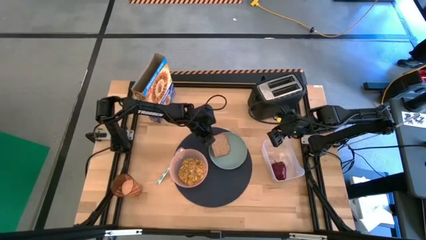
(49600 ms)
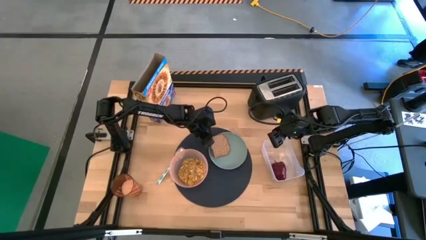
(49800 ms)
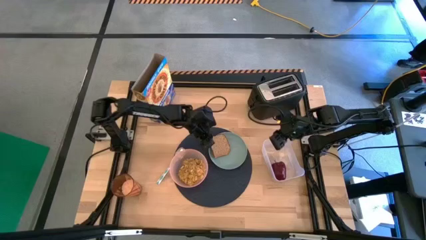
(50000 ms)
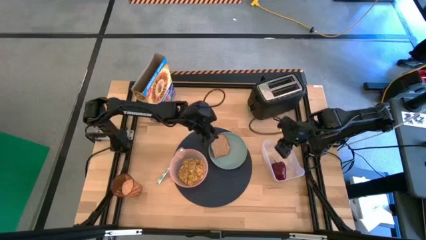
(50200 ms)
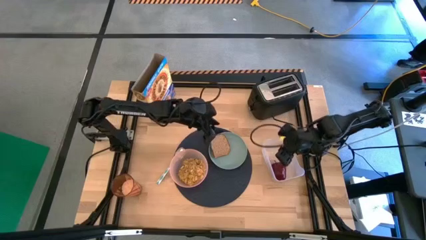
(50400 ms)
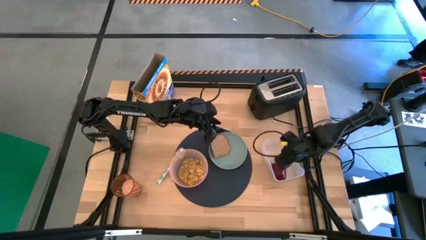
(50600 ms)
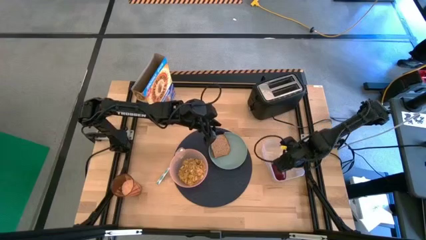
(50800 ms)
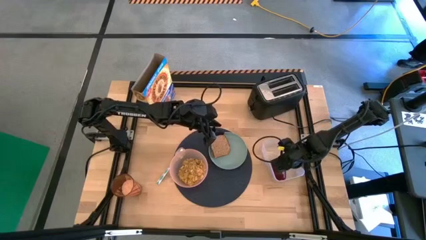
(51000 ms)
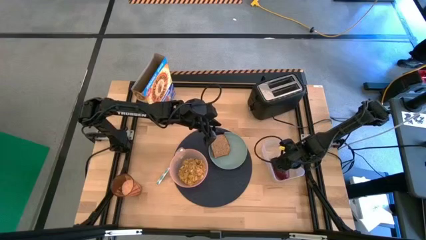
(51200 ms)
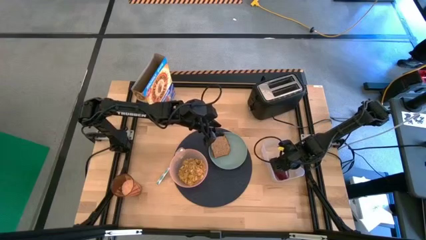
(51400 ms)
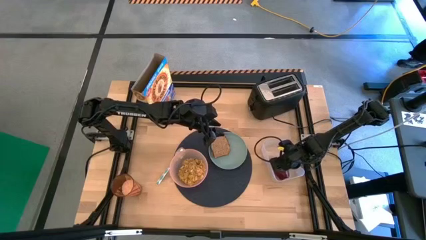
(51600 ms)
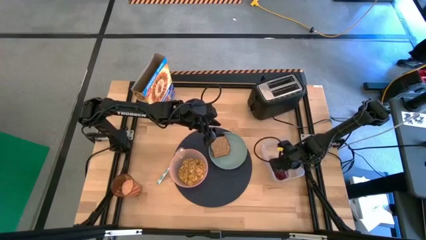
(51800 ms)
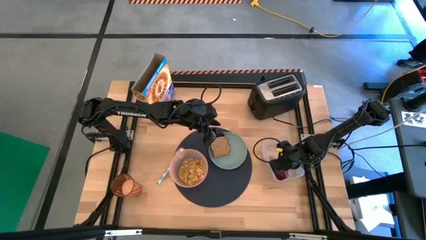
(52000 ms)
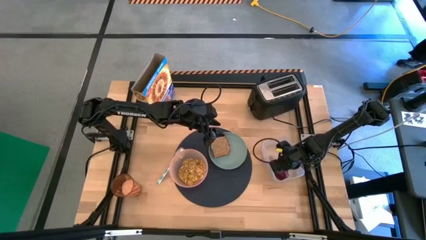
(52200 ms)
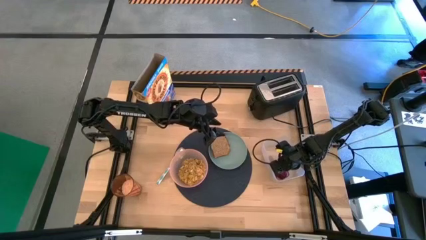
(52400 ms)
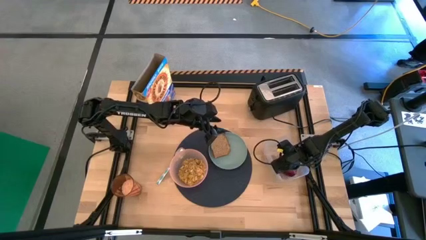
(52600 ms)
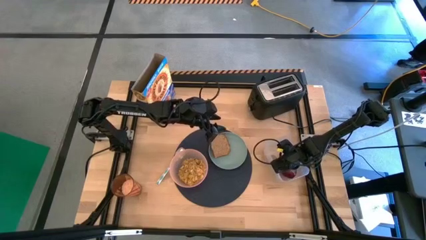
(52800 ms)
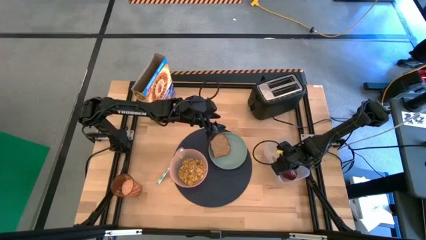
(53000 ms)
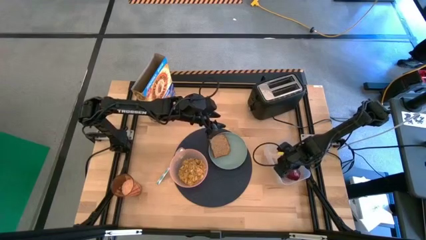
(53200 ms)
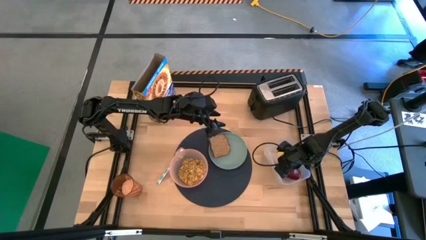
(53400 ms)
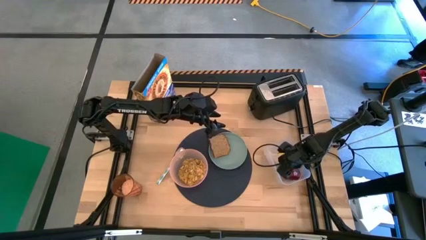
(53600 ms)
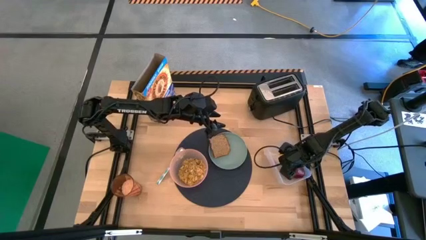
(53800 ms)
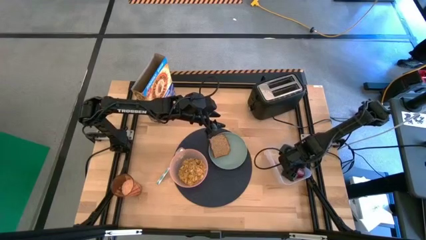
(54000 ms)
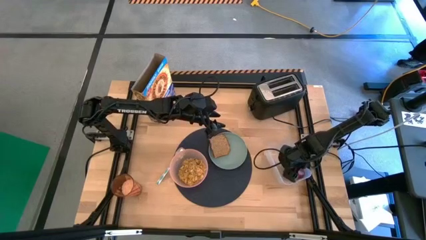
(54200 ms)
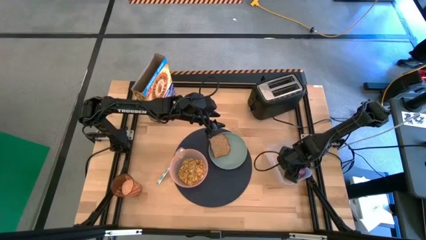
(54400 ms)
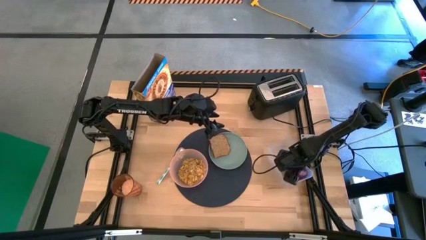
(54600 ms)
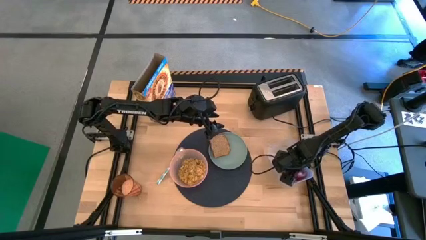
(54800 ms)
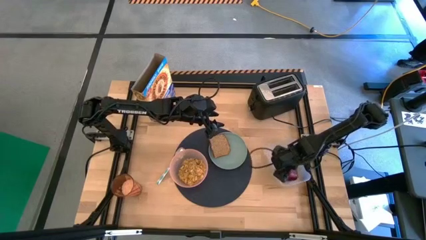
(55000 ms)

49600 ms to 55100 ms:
Task: Arrange a breakfast setting
Put the apple from the transparent bin on the blue plate

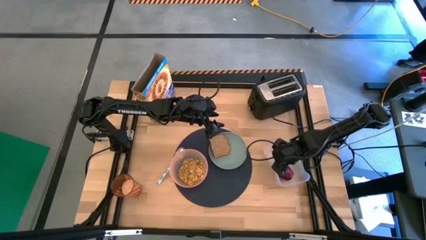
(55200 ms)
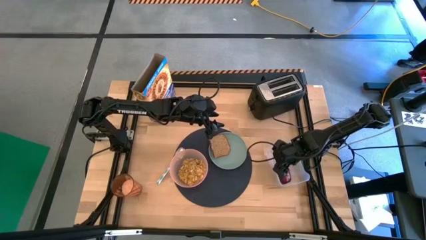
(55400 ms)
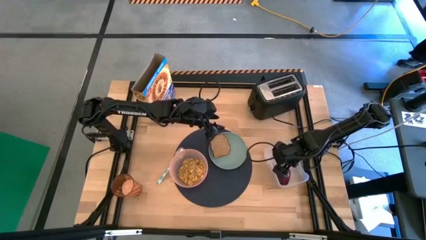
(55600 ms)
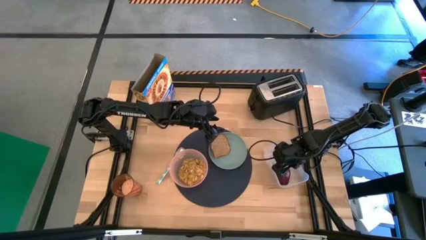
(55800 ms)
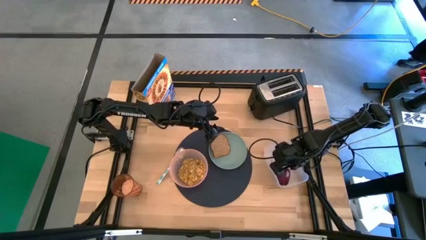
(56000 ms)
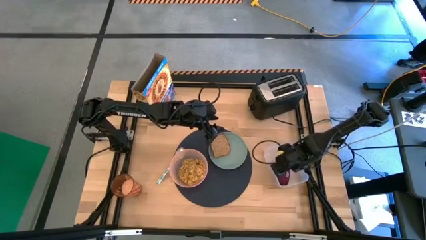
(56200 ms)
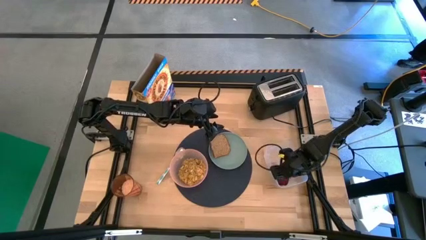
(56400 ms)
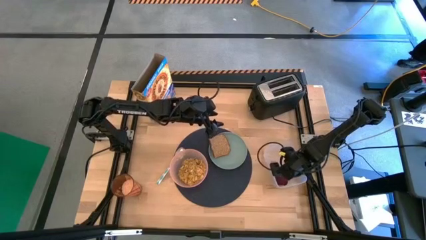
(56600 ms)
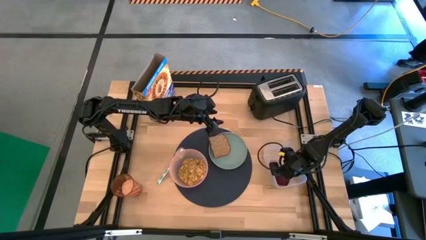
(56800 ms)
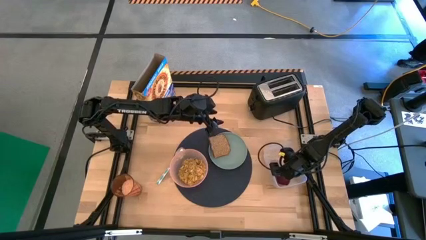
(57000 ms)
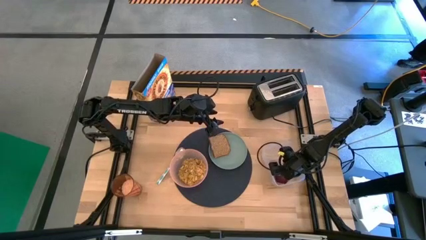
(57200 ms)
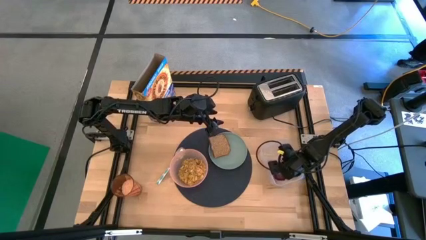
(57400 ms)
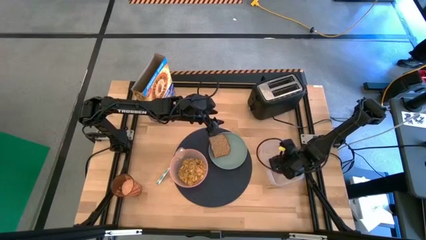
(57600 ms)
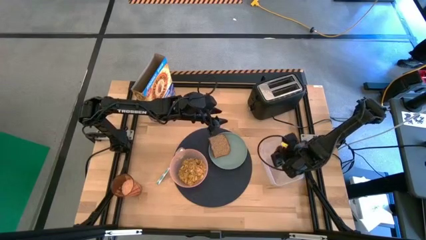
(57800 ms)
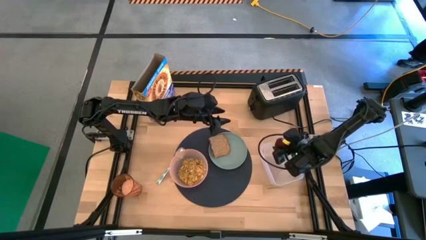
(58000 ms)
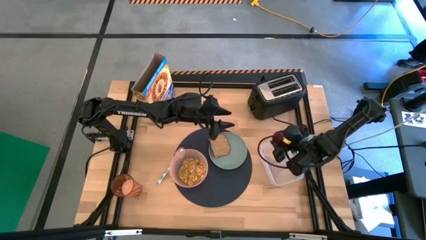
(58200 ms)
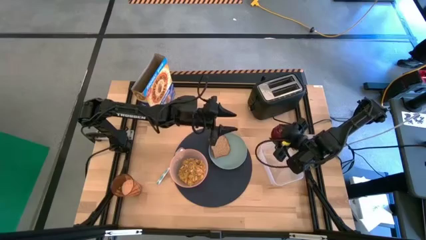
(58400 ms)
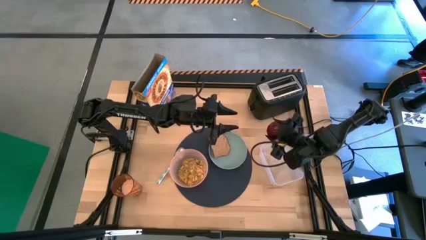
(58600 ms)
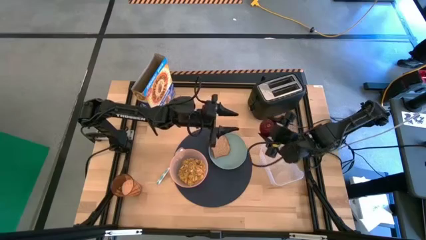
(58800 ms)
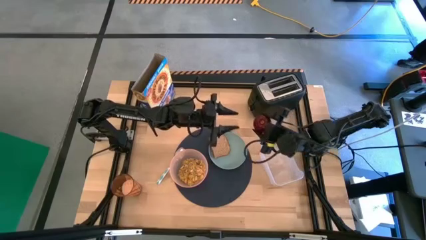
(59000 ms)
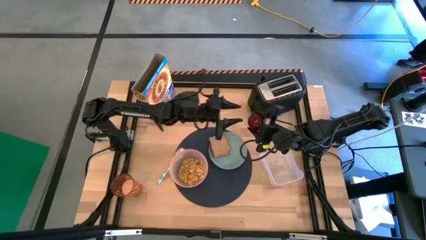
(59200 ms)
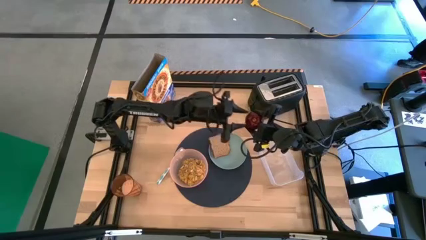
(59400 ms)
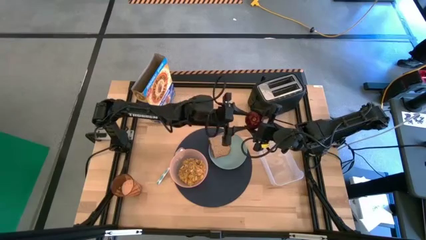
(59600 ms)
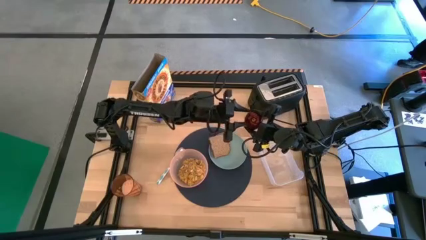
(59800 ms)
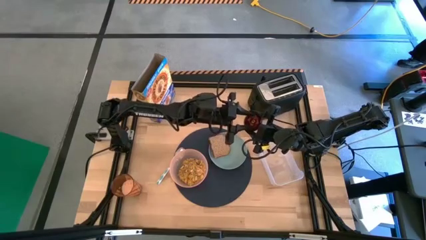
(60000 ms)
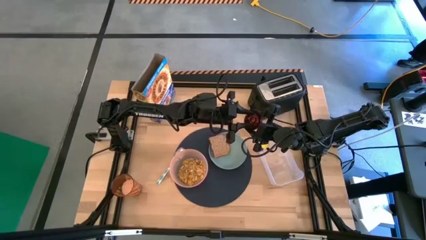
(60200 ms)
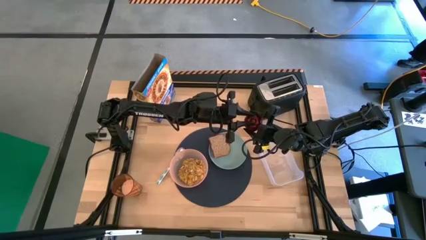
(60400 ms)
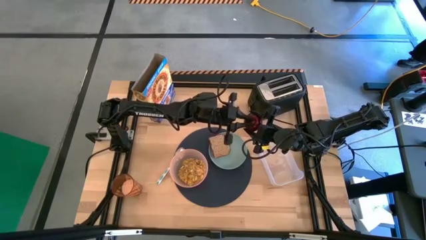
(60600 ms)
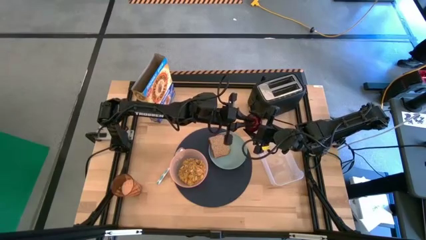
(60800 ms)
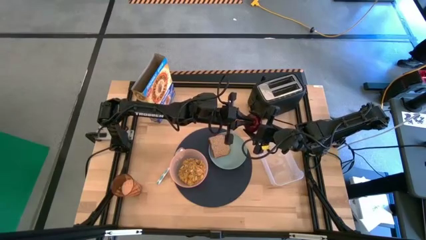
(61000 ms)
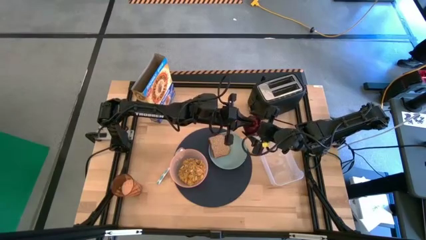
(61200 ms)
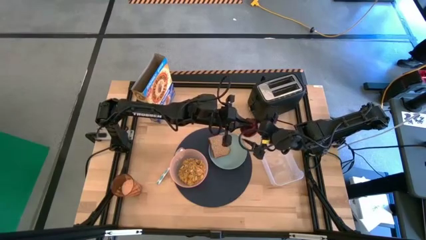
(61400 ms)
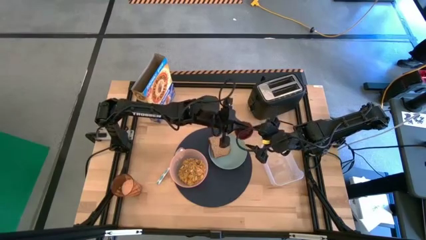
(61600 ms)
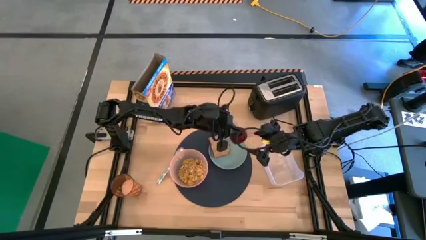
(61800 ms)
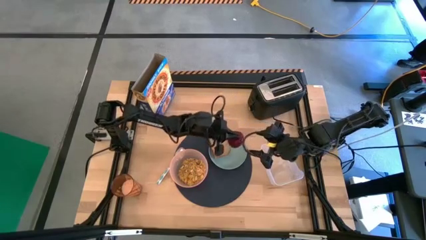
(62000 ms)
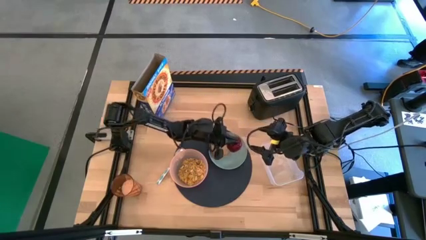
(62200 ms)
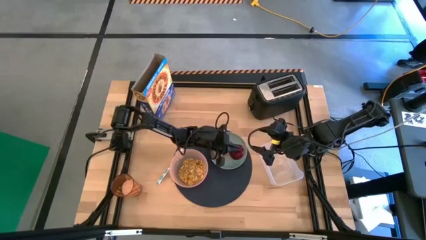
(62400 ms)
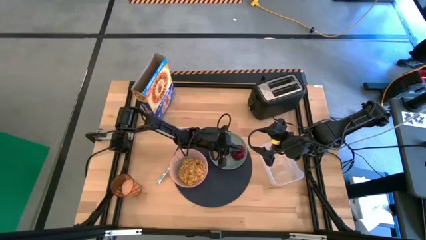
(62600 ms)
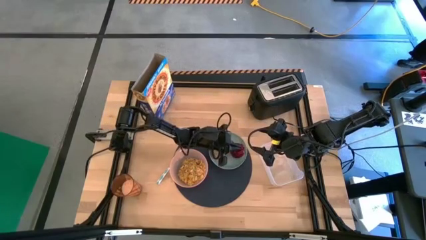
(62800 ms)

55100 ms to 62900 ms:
Put the apple from the transparent bin on the blue plate

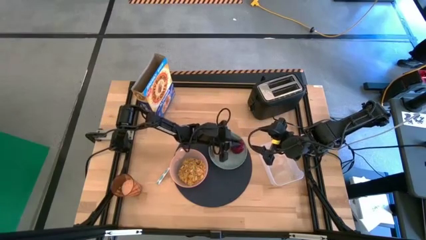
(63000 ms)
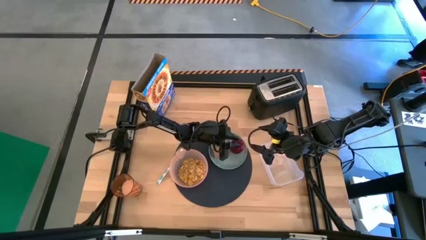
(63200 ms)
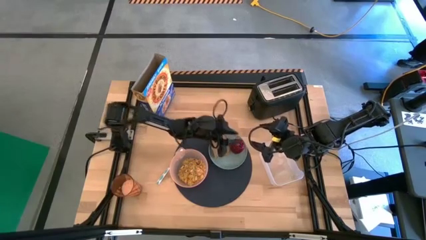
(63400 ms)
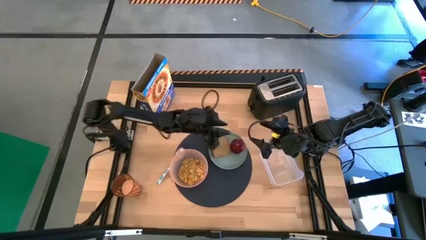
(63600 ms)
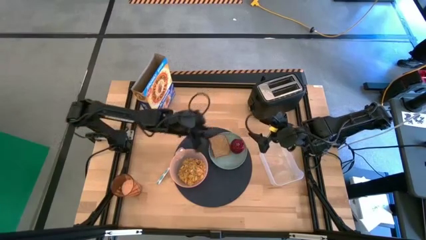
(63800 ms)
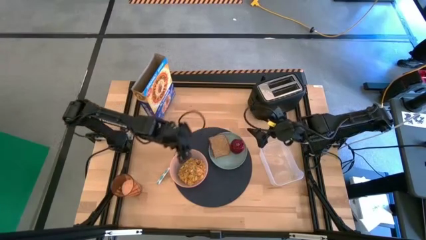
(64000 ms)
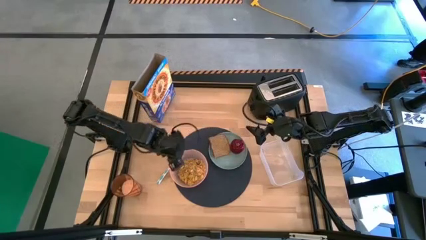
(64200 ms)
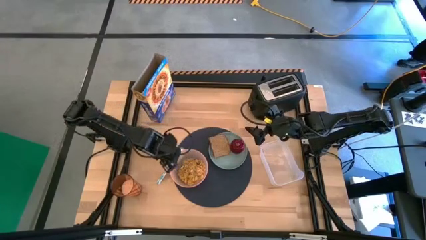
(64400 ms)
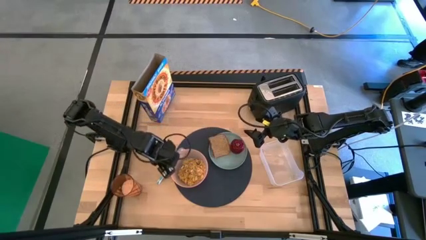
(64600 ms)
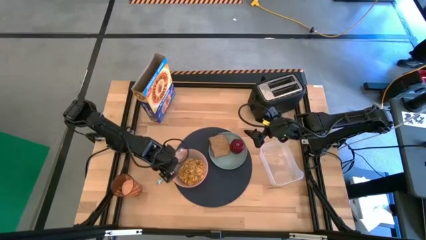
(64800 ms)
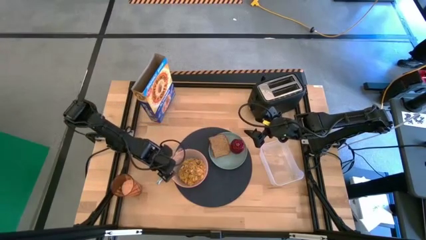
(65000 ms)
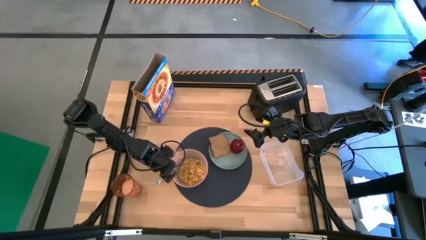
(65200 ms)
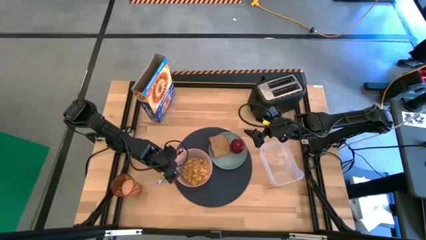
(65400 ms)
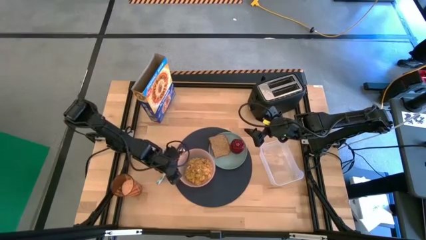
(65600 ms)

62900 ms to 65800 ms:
Adjust the pink bowl on the blue table mat
